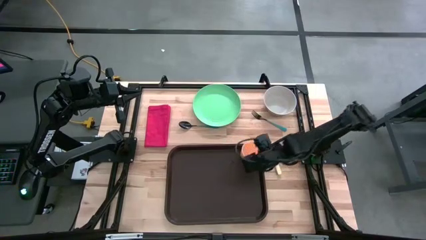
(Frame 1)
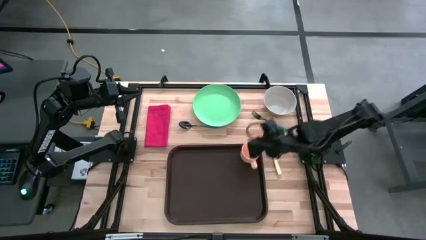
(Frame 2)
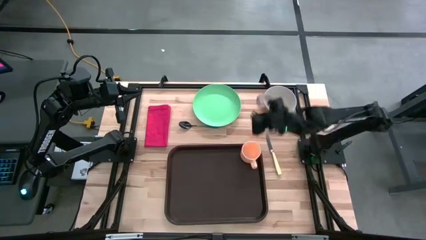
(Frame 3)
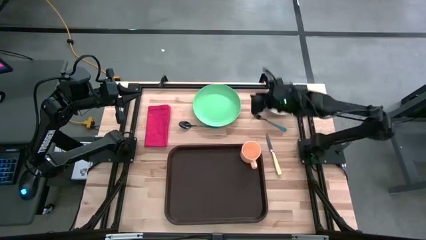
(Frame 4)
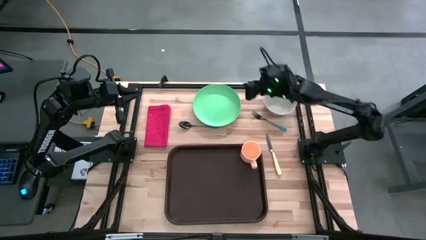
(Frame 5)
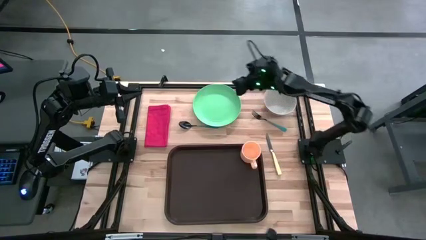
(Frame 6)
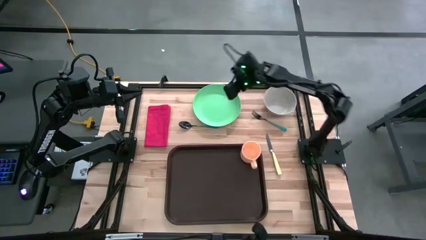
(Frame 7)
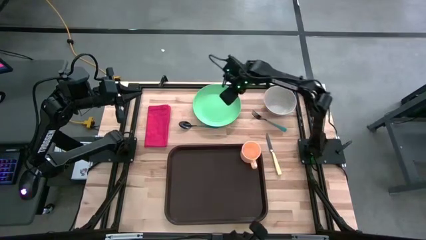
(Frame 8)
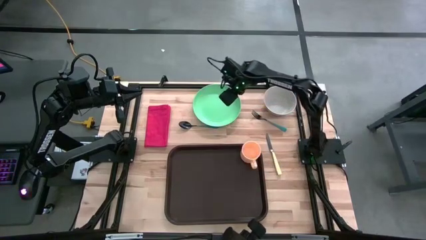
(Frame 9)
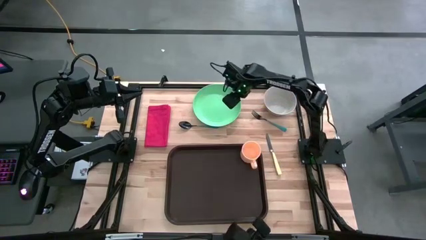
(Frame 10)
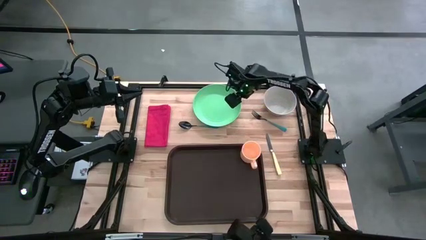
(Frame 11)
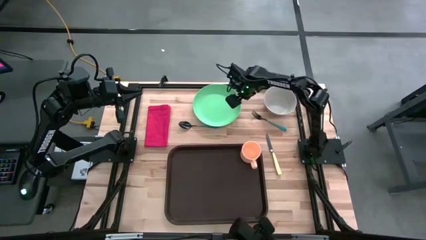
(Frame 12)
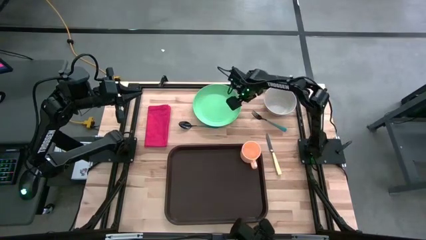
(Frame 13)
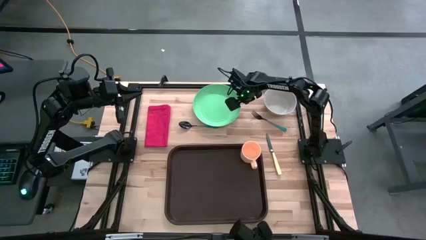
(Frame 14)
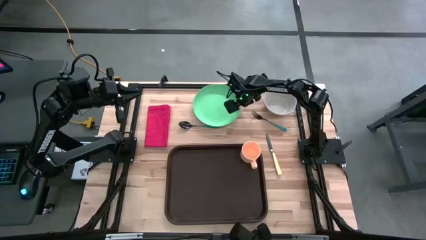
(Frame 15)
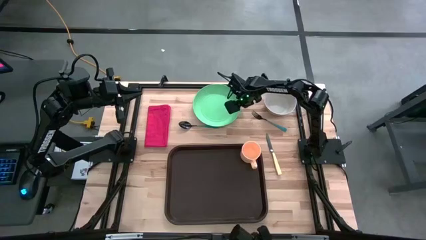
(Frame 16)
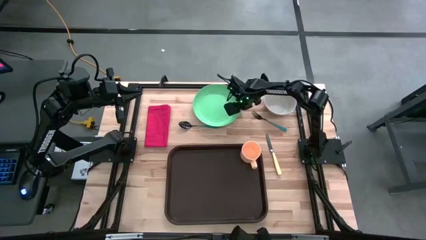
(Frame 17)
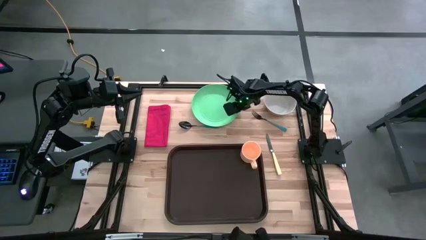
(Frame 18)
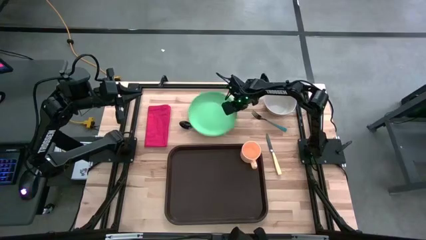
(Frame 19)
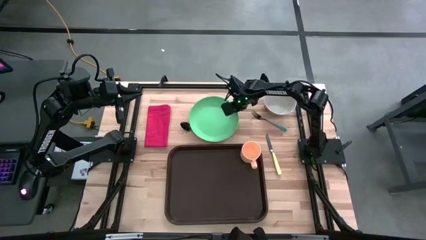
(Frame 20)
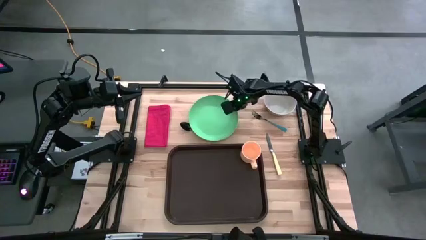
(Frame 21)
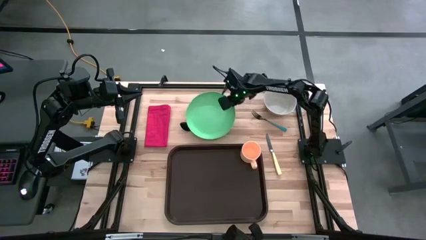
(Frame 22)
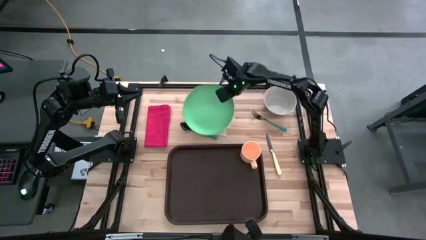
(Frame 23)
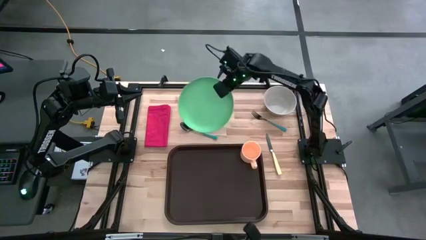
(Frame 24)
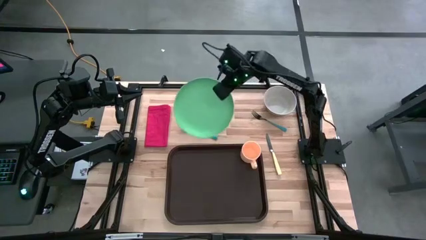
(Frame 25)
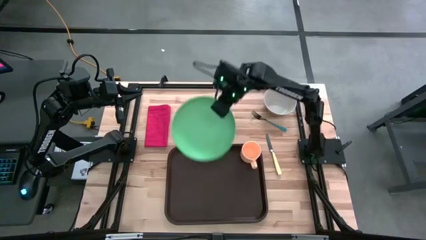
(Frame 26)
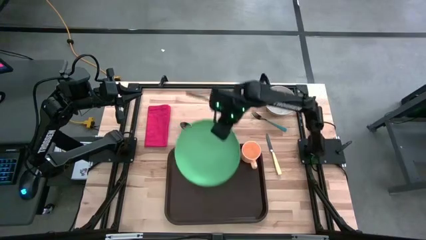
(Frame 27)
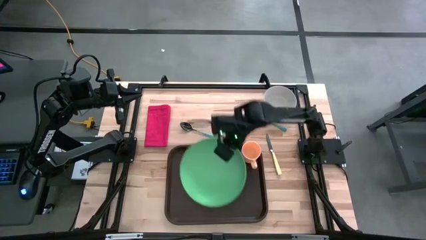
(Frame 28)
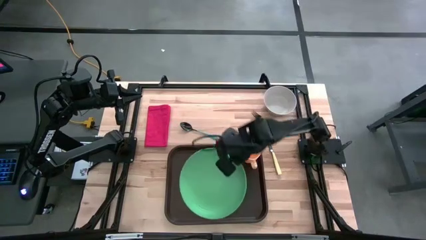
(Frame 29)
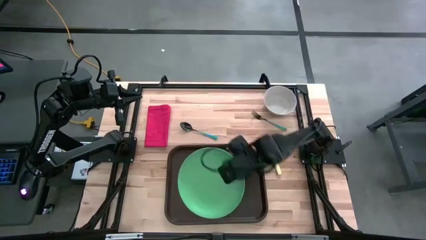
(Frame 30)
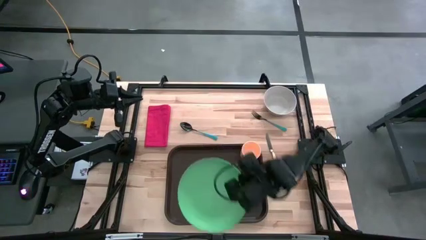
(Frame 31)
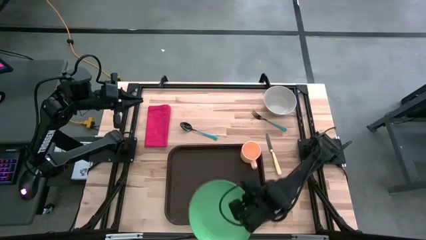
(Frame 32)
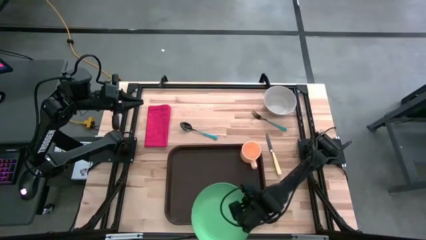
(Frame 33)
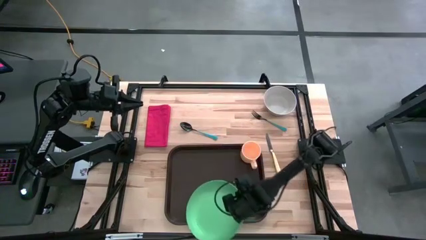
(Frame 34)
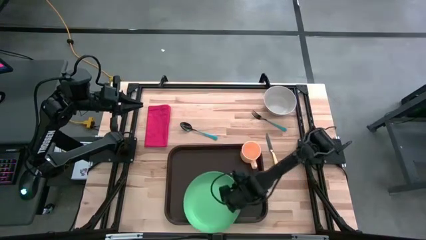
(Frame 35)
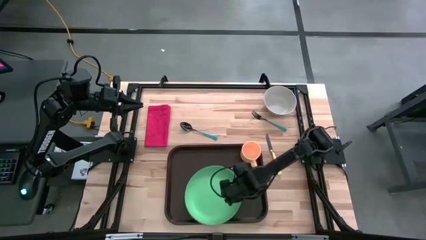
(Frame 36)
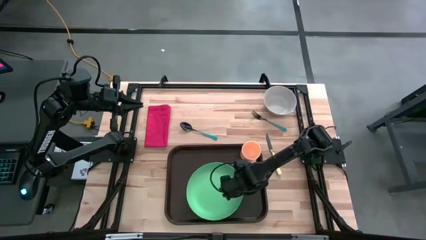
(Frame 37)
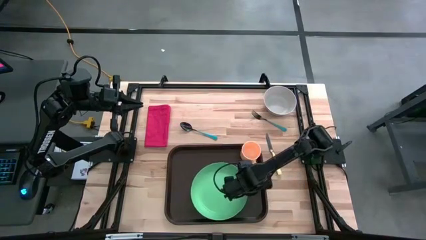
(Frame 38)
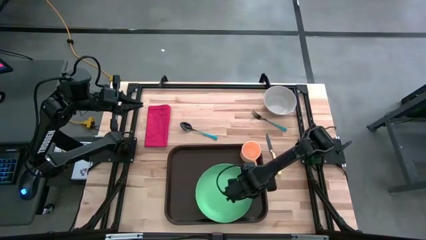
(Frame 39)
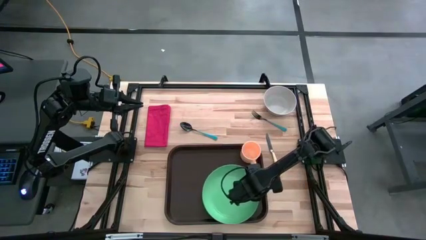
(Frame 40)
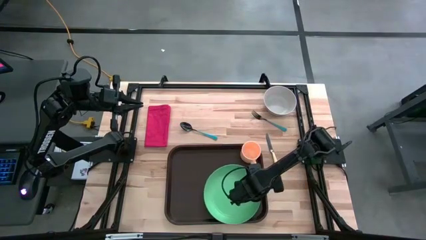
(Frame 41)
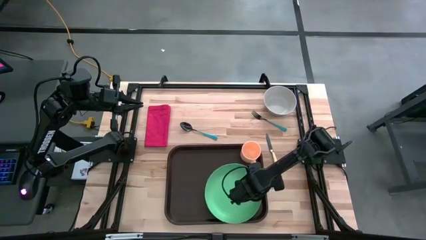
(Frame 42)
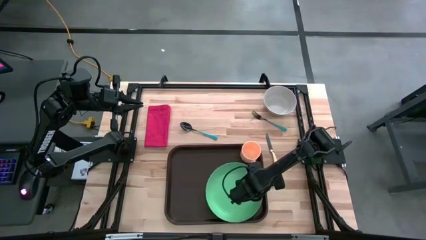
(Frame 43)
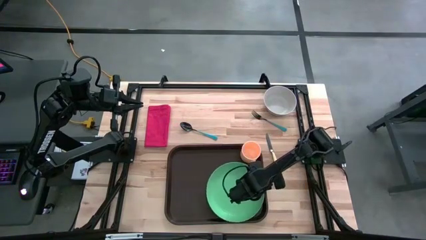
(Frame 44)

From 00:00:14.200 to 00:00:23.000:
Task: Set up tray
Put the green plate to the bottom of the orange mug on the brown serving tray

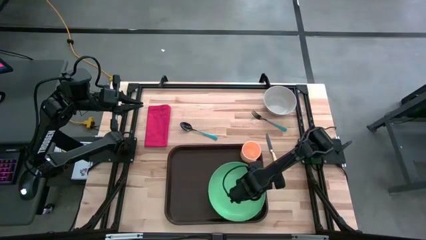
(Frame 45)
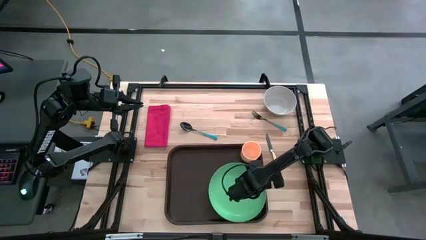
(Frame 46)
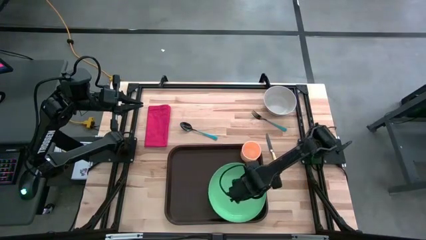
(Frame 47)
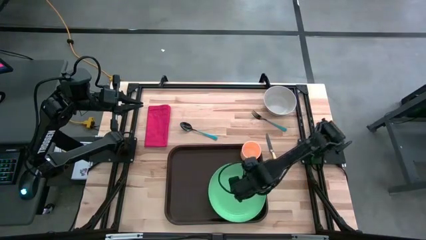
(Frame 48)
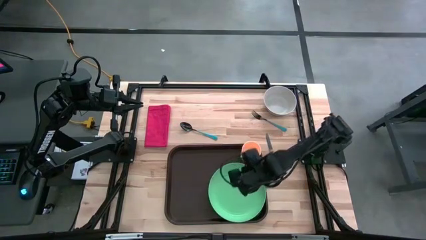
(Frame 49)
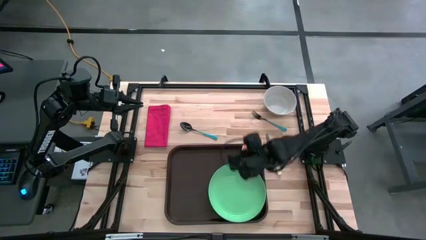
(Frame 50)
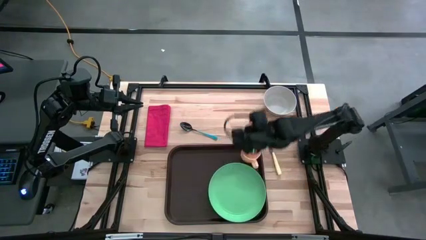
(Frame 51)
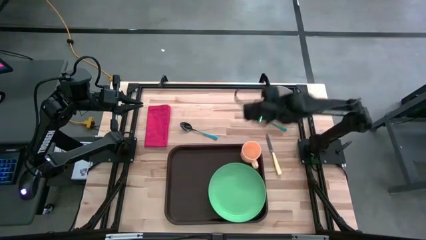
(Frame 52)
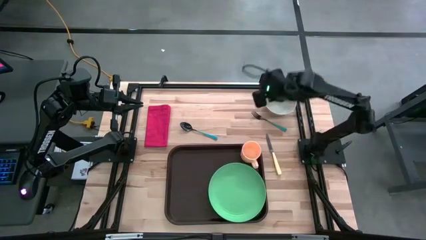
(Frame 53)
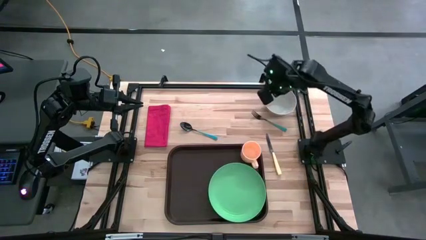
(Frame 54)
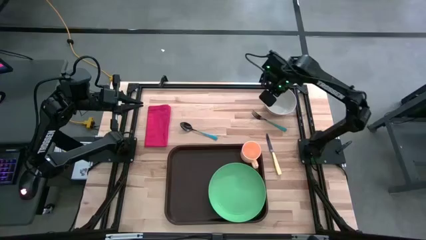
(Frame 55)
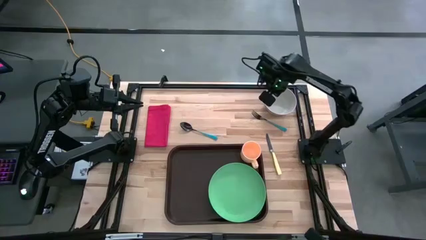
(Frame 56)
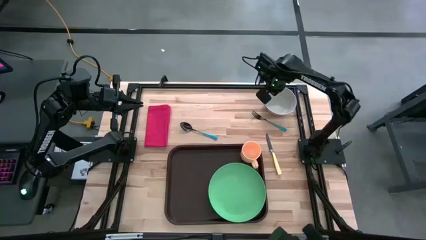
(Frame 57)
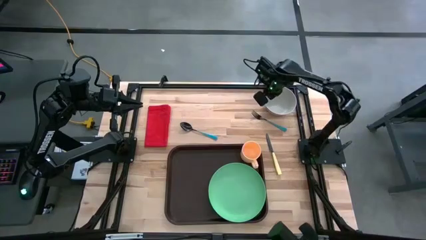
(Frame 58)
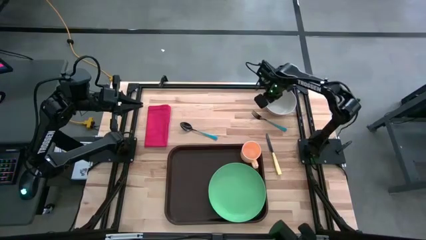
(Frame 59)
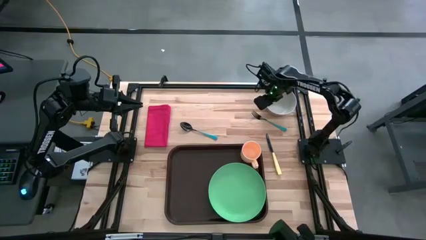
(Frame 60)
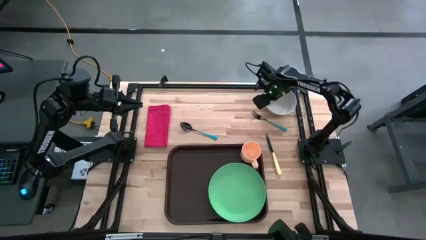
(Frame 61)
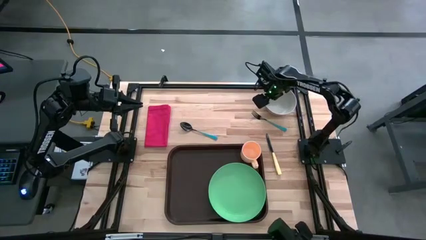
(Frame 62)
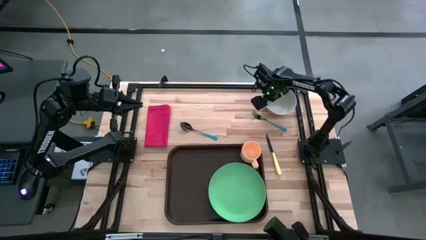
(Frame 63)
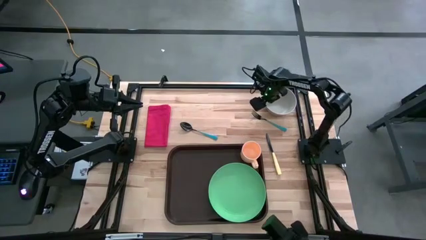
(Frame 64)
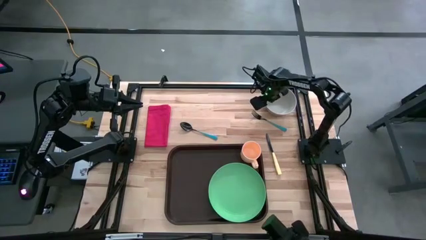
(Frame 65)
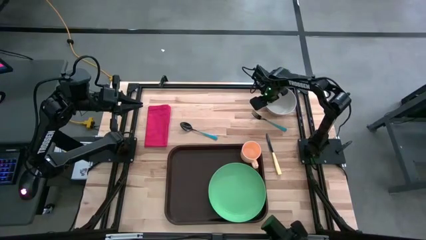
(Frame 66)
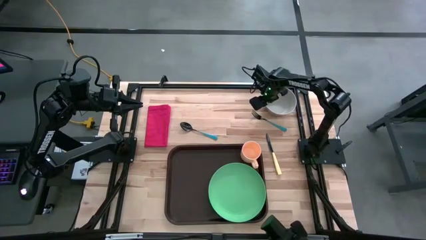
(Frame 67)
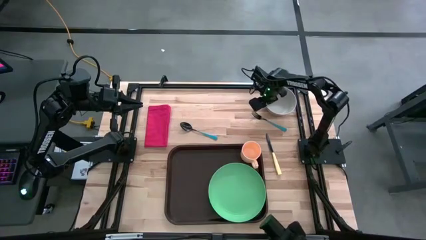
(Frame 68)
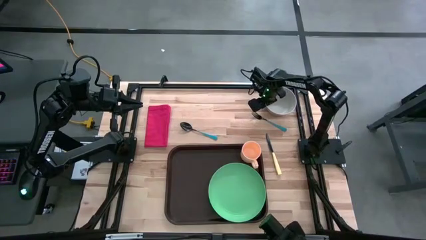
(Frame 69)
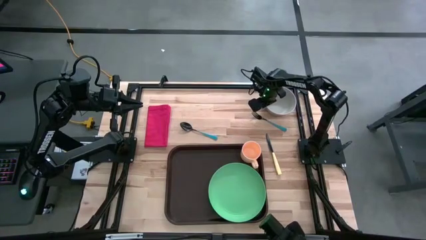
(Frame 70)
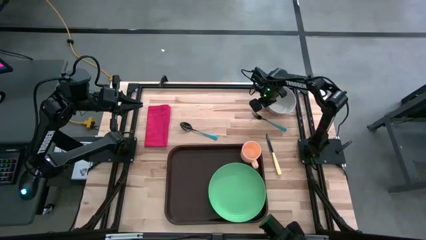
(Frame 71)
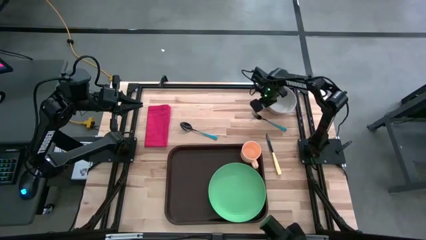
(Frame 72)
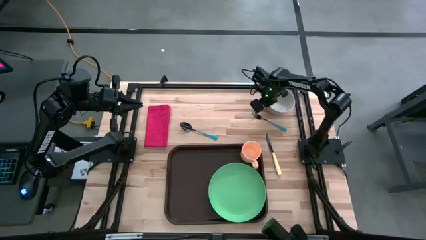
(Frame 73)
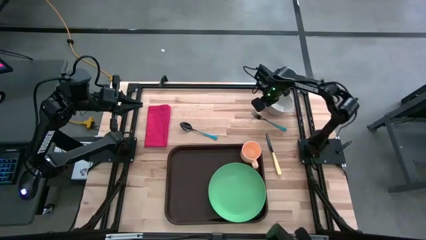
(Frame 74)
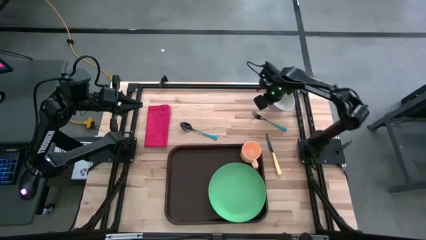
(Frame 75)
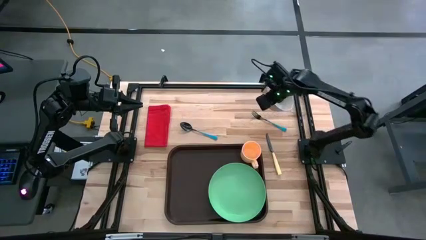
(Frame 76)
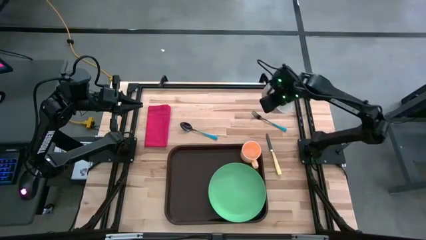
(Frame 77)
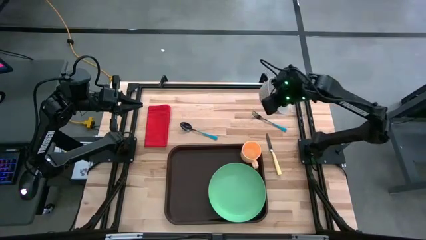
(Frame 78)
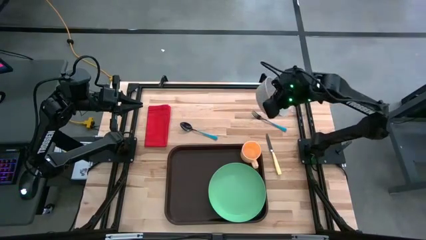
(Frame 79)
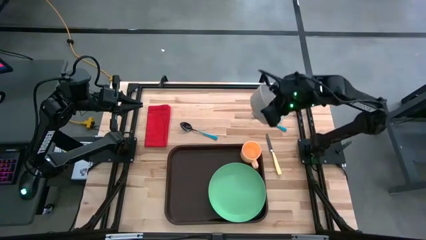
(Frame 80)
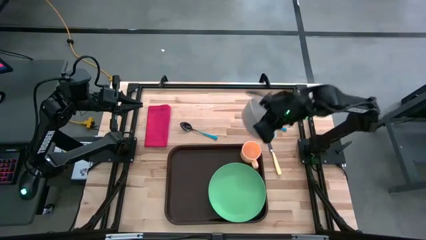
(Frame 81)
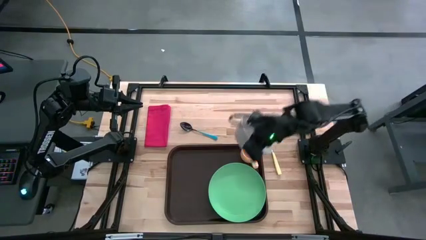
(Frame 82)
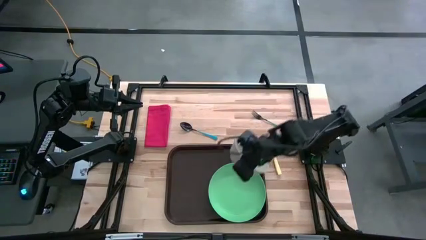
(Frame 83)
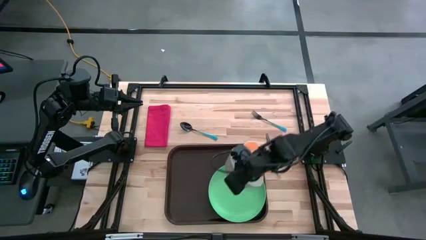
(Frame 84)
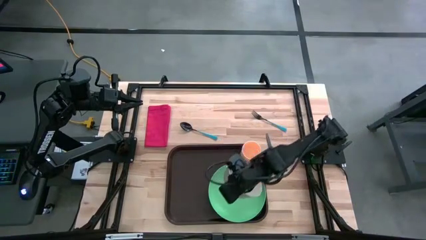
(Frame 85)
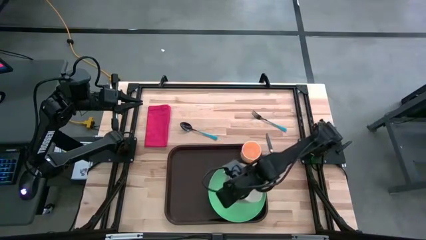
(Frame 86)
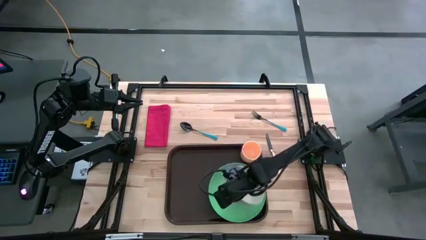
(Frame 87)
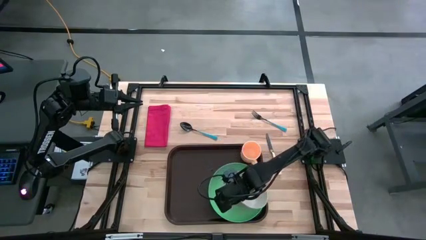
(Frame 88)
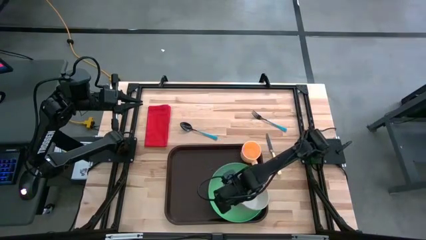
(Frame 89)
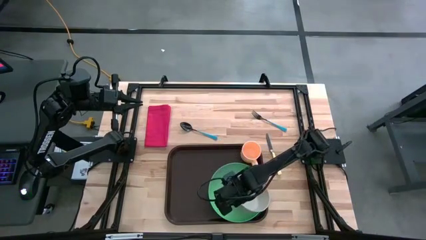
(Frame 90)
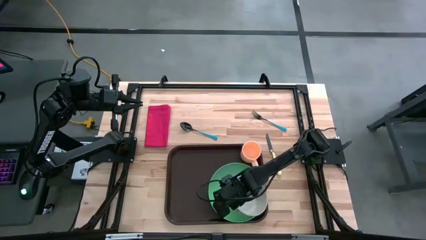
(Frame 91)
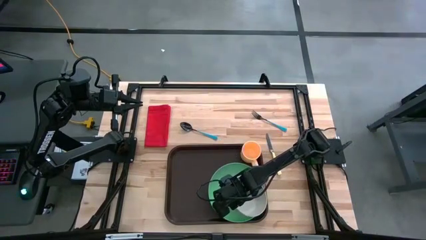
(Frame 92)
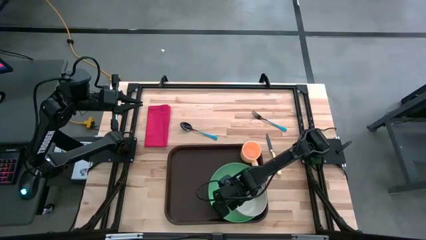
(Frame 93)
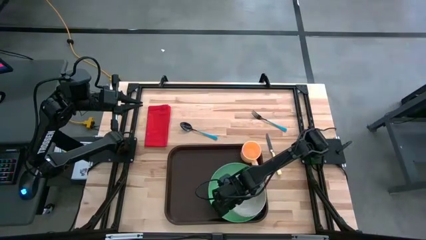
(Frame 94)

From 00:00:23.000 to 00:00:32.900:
Put the gray bowl on the green plate on the brown serving tray
